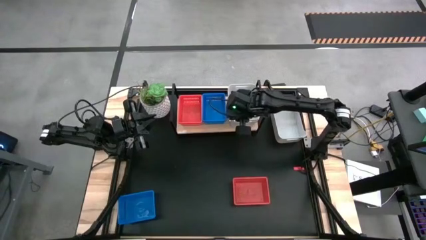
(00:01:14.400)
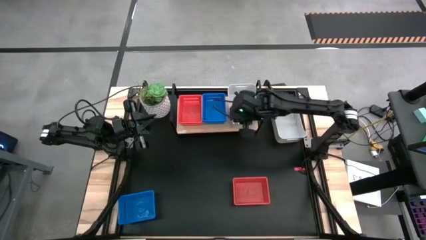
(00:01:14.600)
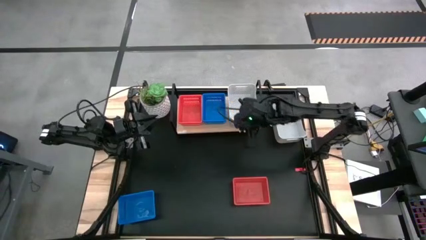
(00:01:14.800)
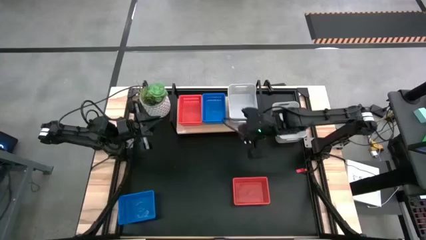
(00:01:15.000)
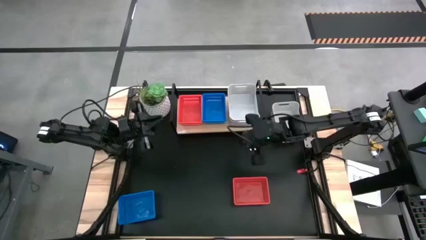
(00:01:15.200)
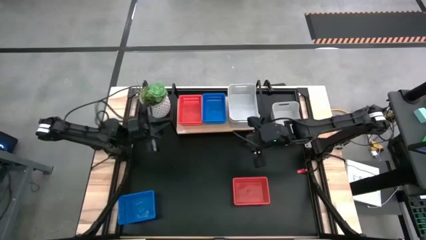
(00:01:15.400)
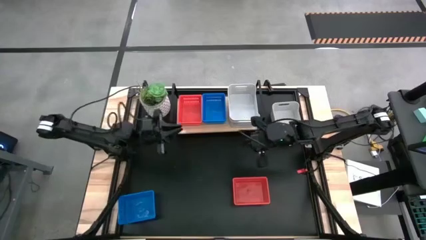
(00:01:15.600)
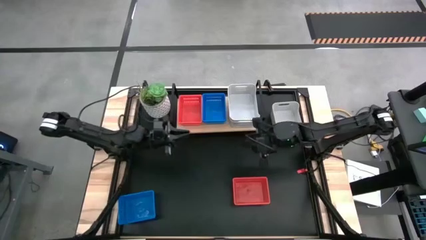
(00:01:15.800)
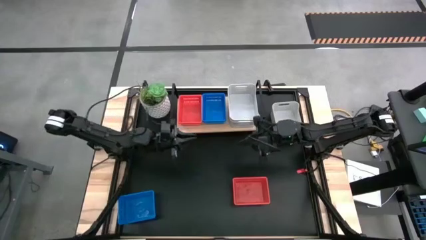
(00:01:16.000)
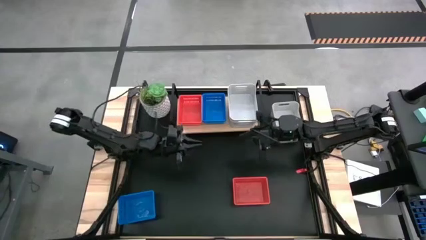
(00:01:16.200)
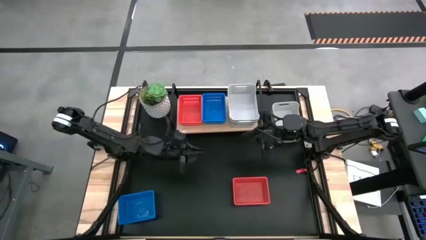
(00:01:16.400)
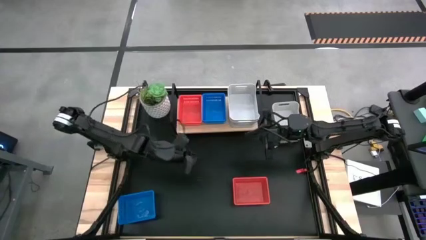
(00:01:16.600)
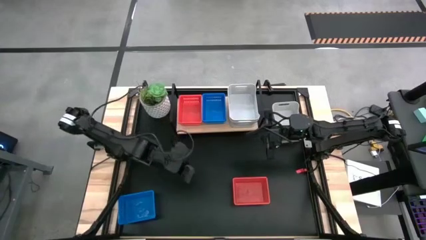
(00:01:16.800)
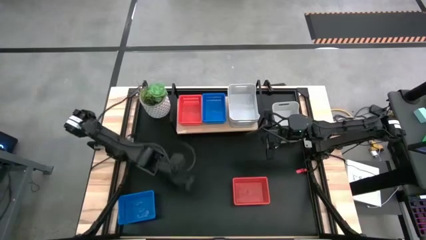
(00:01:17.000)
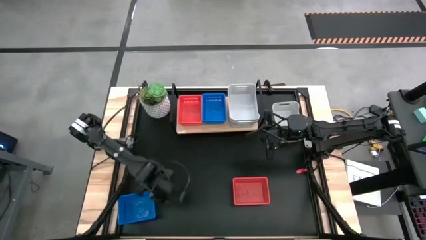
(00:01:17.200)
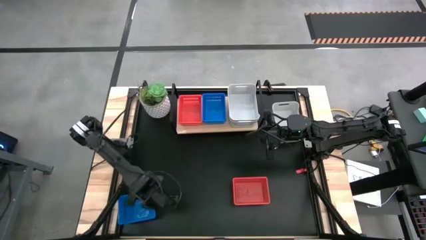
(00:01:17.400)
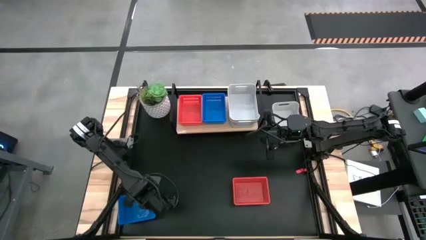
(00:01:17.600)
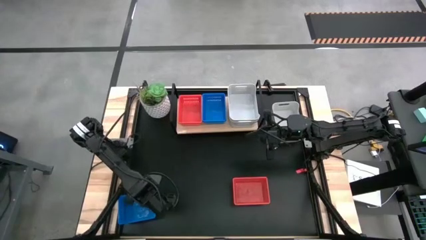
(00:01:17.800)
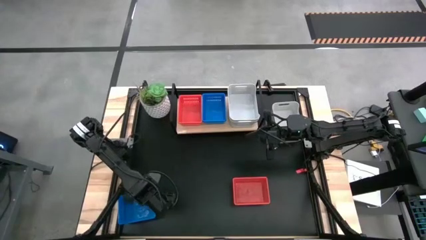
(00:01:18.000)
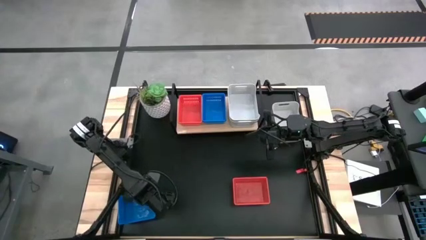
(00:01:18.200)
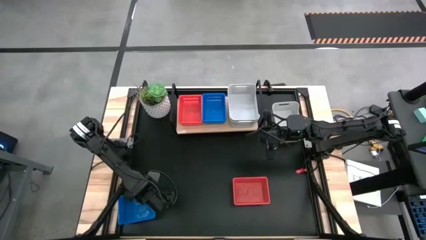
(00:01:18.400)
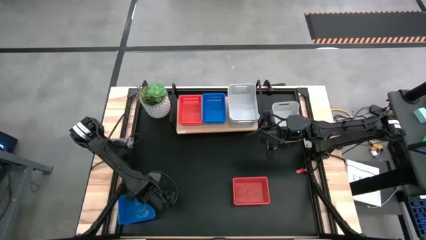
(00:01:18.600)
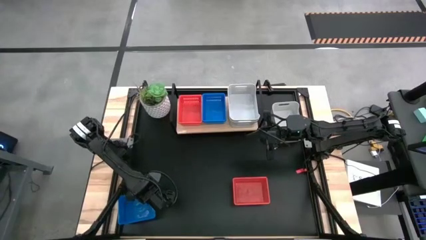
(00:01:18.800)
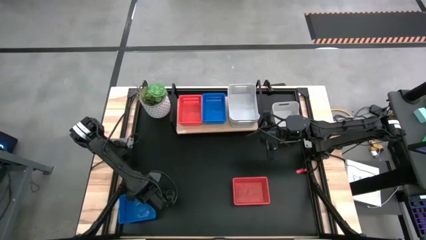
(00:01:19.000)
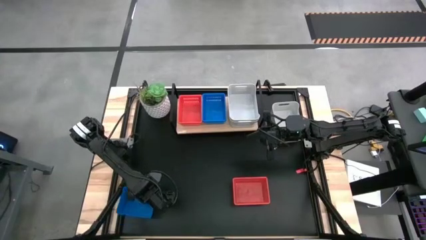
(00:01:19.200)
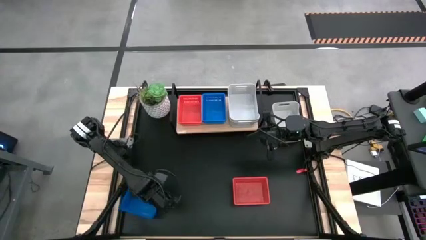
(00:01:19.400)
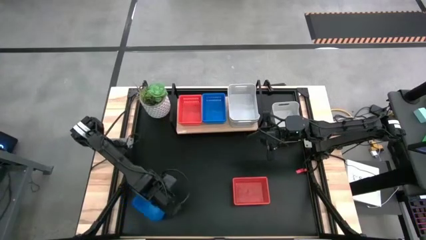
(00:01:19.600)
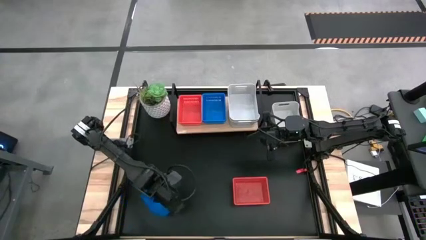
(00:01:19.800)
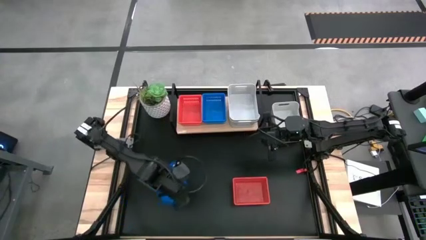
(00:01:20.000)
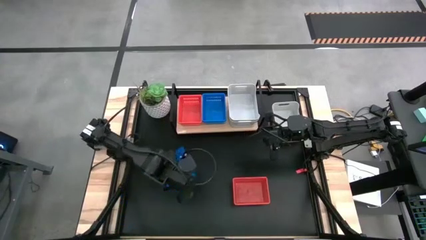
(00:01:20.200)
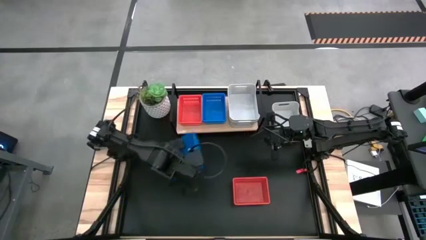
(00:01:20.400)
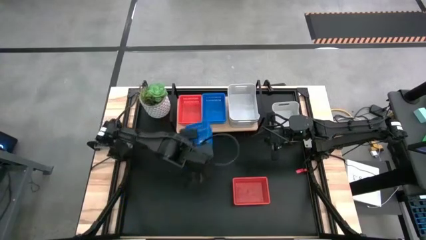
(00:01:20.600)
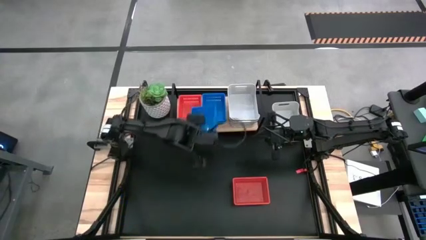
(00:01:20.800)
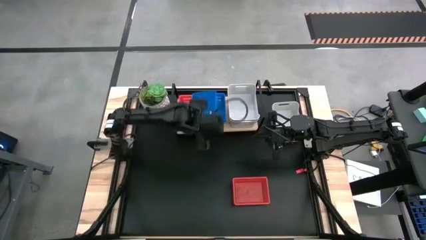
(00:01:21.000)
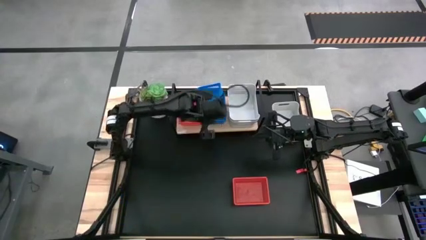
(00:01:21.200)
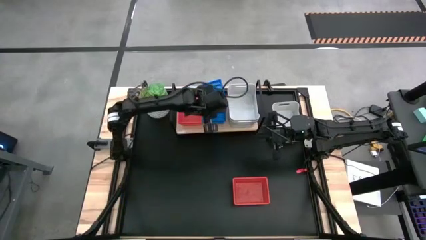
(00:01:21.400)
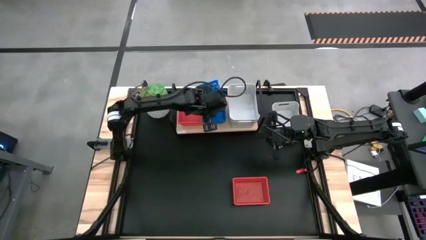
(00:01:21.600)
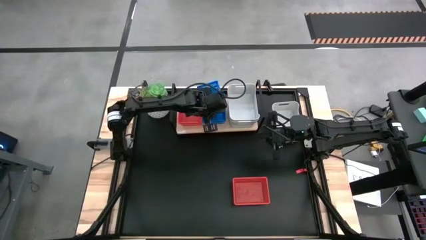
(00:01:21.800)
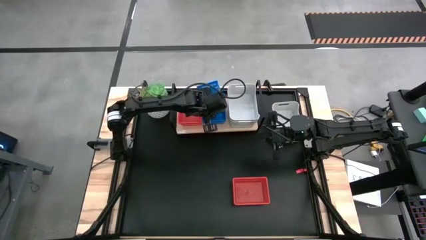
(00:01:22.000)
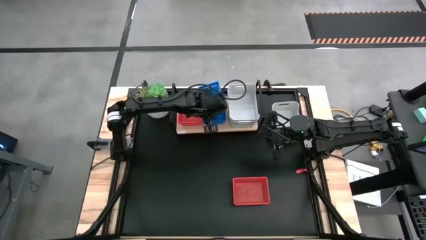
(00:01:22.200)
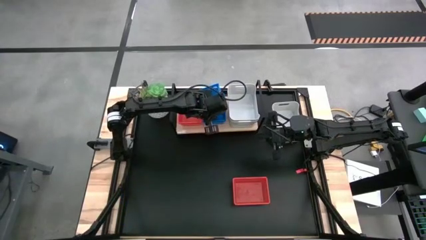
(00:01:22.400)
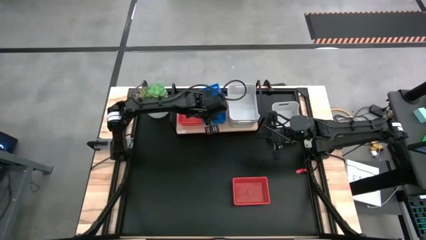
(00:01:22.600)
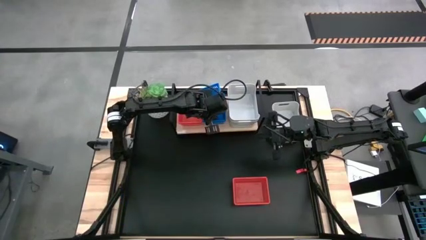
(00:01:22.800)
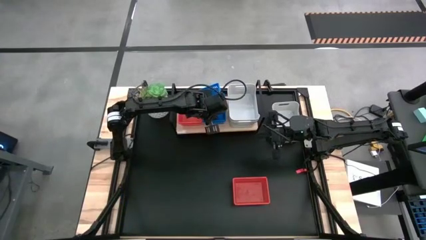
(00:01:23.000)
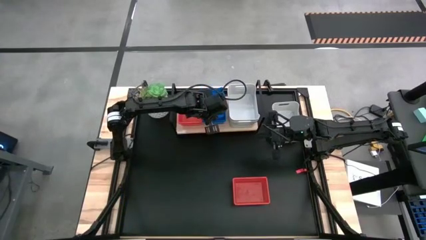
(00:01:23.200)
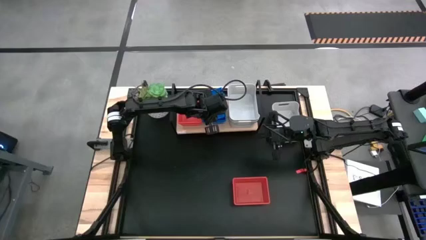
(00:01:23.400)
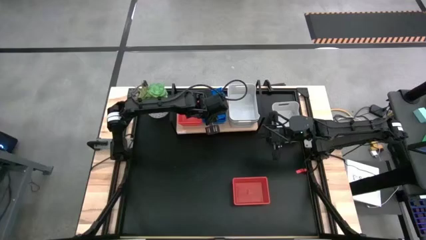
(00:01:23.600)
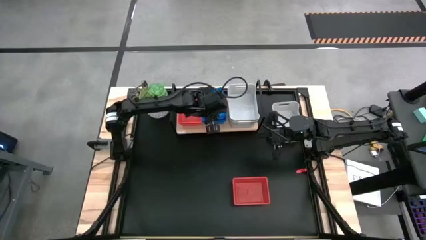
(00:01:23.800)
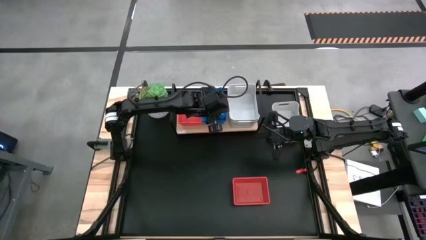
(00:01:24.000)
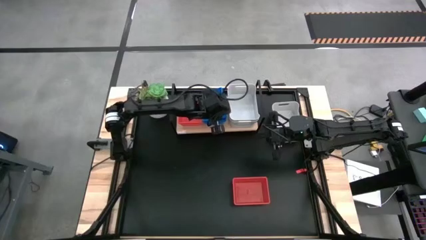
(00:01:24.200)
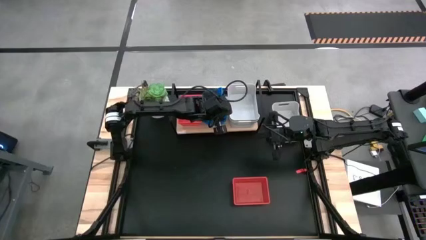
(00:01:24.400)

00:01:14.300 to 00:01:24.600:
Stack the blue basket on top of the blue basket on the shelf

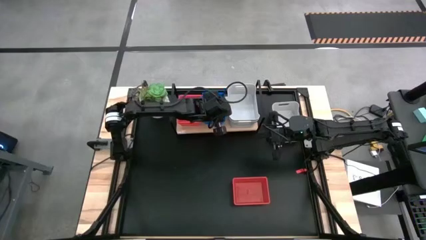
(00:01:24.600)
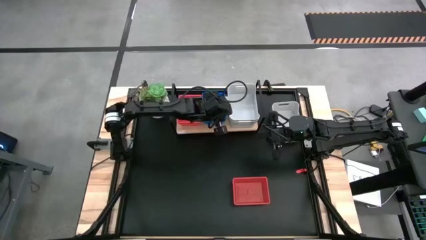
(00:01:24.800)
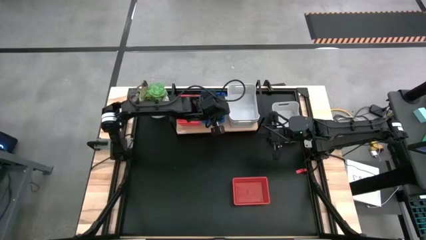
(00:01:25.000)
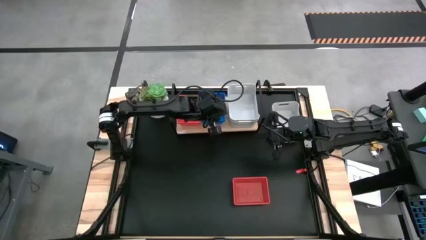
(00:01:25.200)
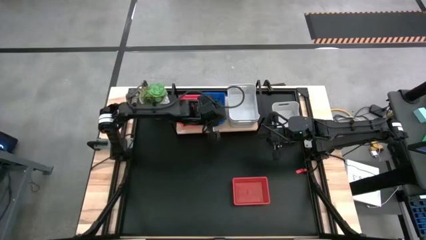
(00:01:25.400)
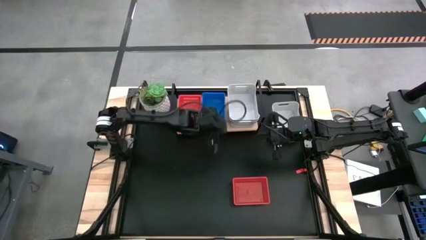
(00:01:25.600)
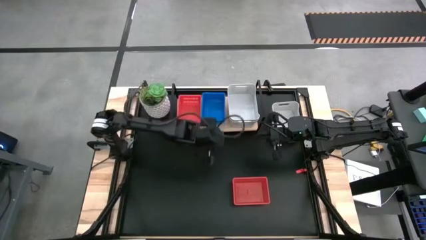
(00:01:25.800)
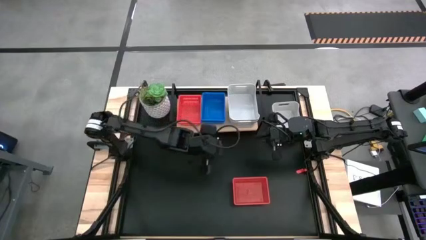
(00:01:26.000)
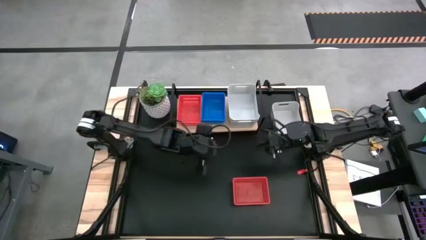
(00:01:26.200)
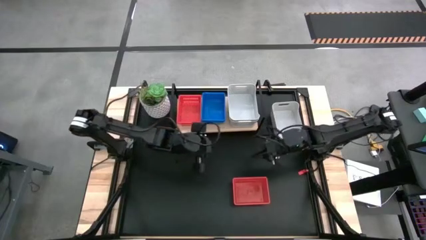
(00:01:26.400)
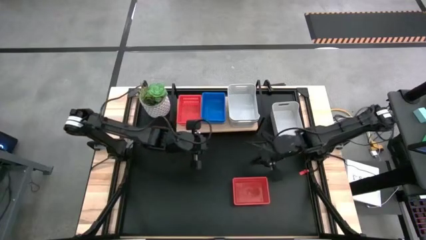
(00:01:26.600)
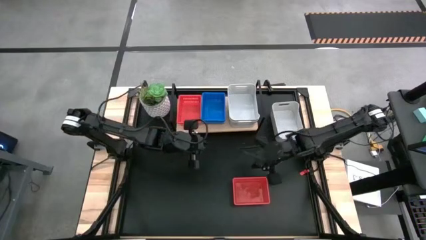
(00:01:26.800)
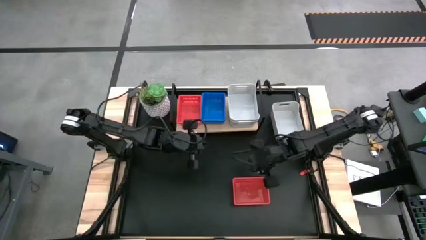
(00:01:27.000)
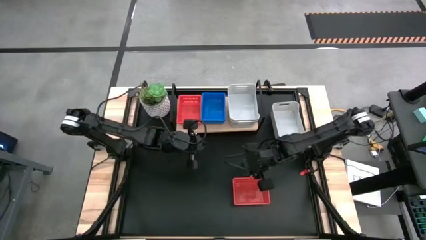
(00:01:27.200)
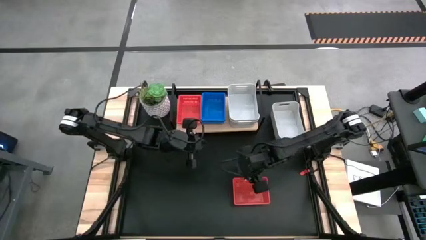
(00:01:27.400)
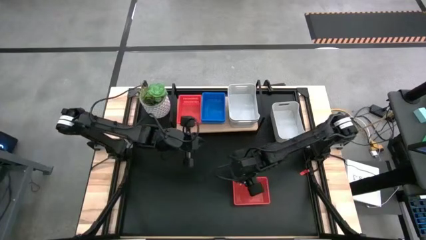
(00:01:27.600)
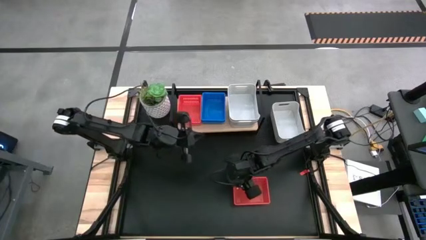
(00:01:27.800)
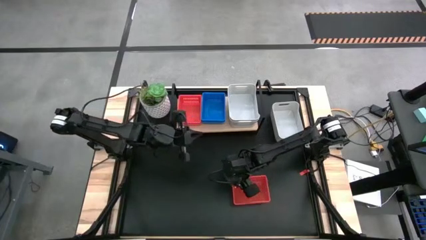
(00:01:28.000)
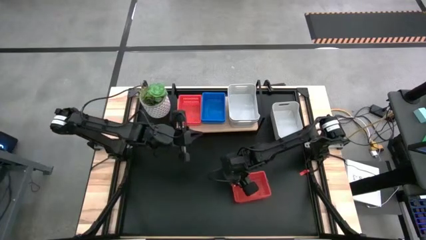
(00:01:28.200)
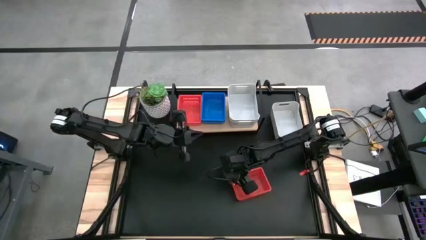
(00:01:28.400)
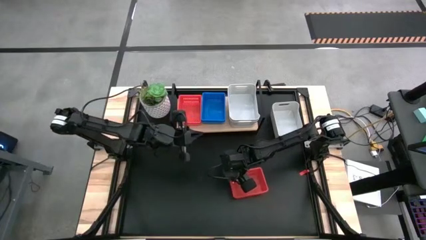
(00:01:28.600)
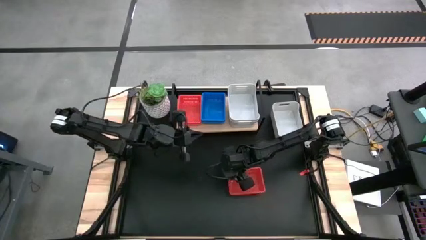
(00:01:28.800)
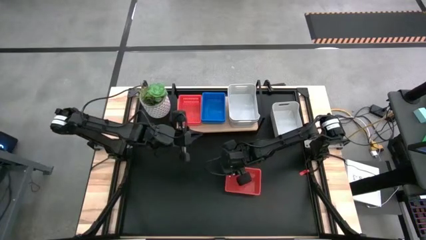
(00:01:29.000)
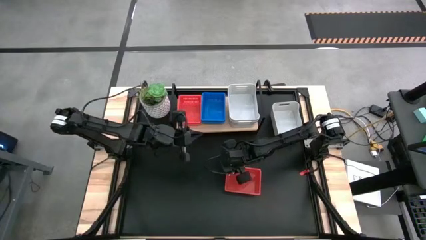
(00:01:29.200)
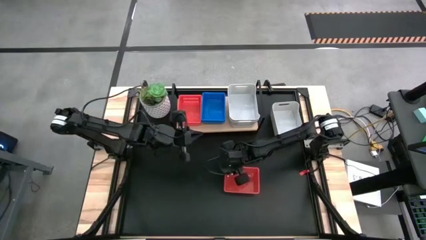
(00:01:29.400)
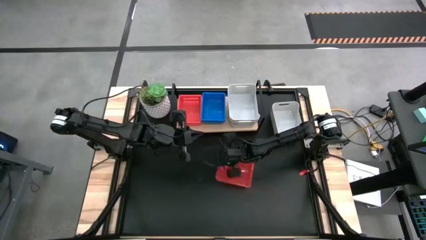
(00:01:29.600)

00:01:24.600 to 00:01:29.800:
Stack the red basket on top of the red basket on the shelf
